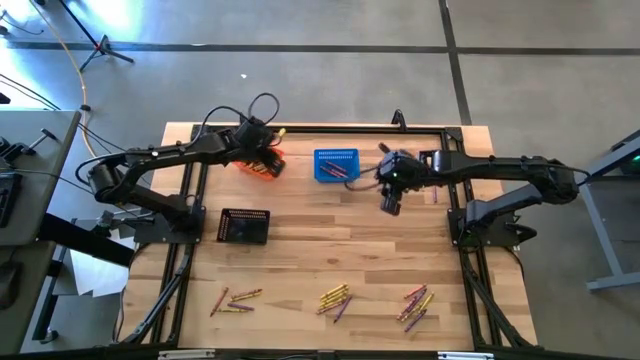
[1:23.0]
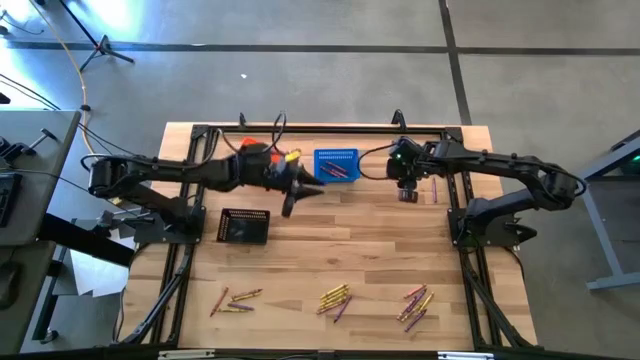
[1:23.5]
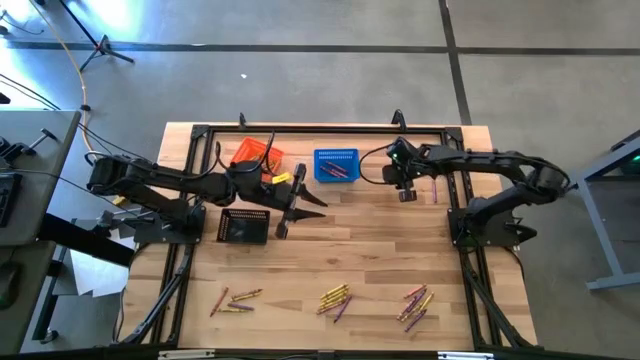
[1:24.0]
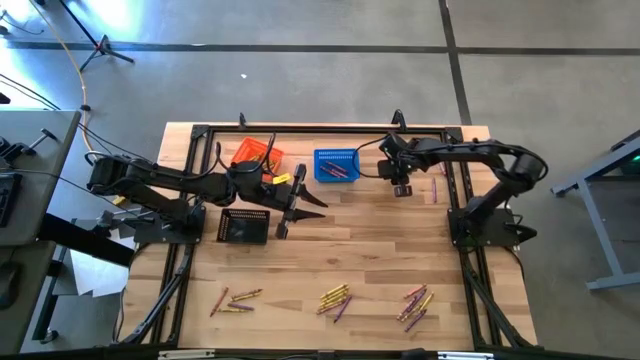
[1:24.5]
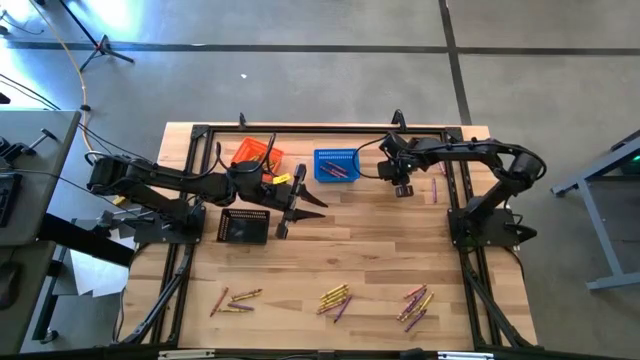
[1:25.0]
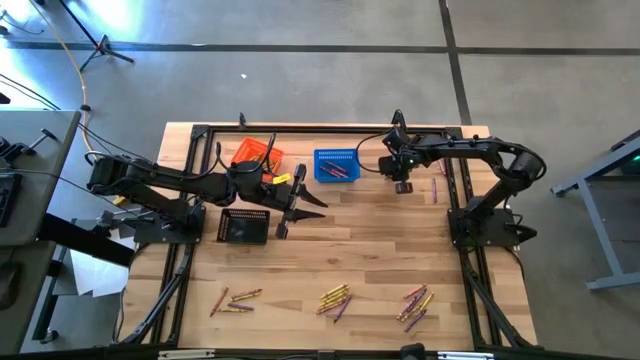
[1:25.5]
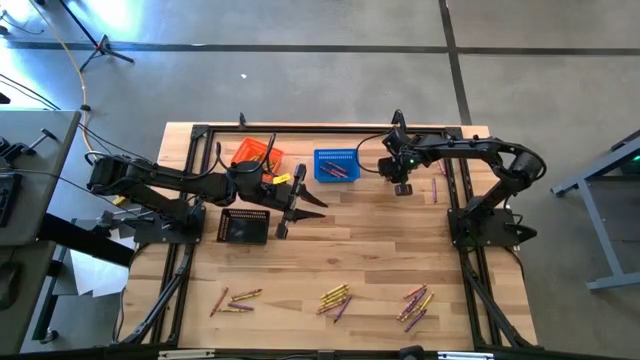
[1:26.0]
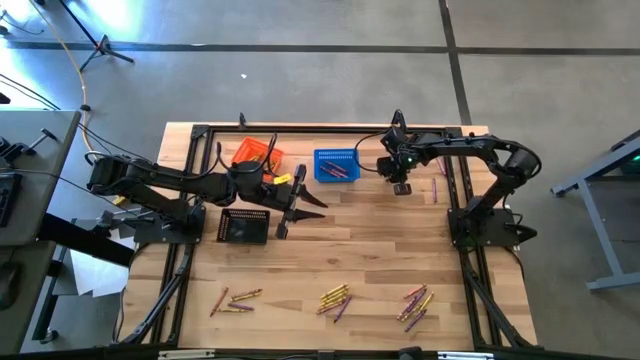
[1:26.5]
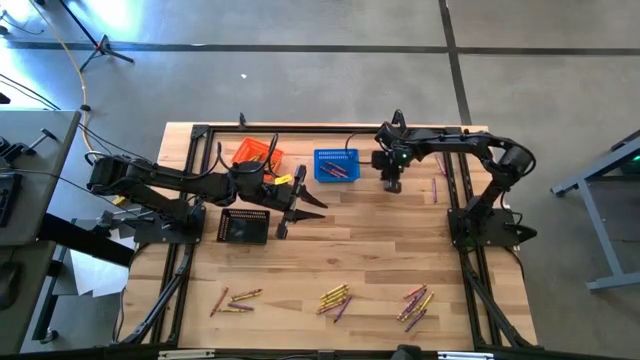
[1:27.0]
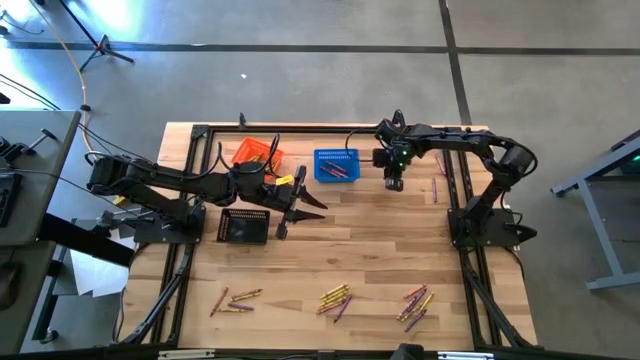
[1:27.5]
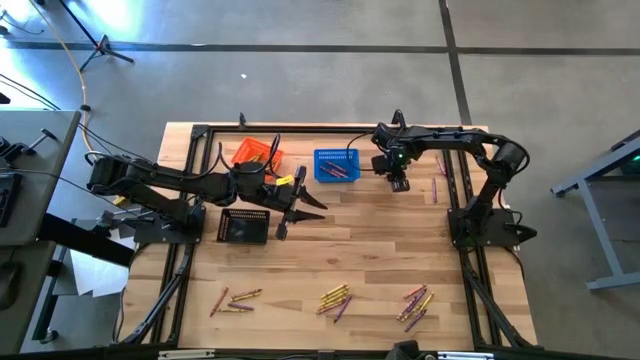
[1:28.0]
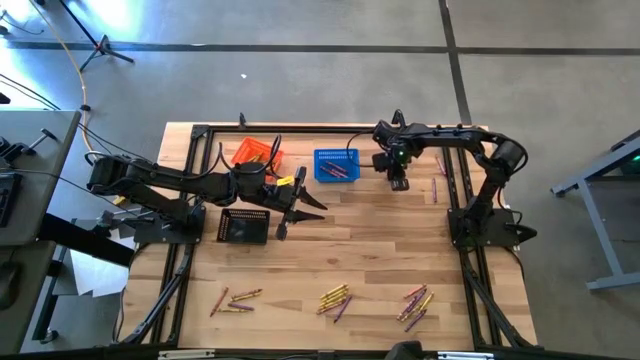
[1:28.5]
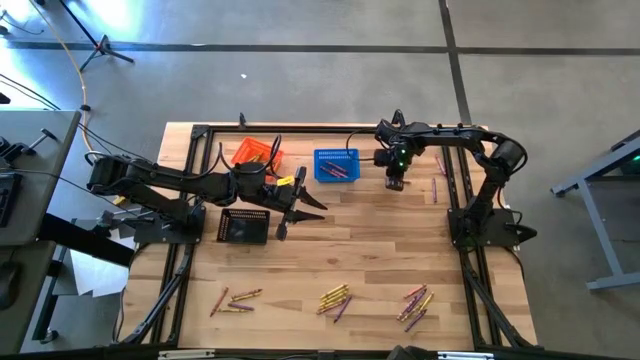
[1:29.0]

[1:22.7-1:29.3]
Task: Sort crayons
Put the yellow crayon into the orange bin

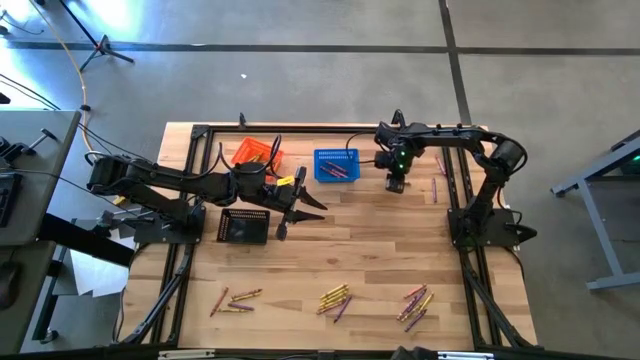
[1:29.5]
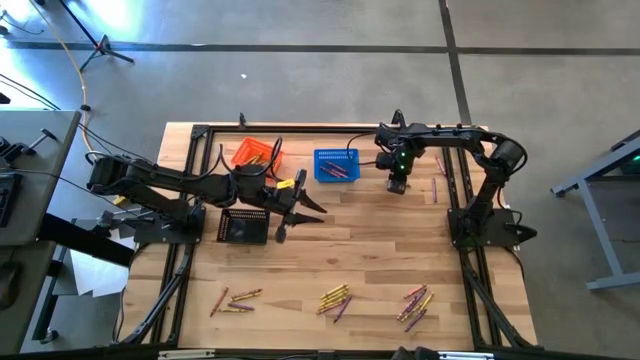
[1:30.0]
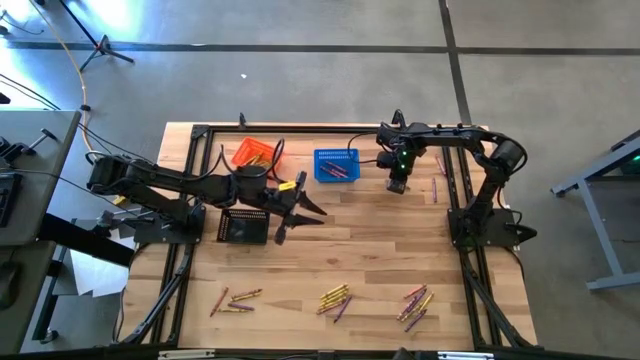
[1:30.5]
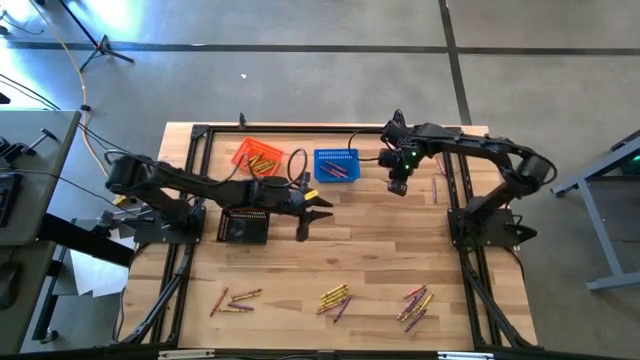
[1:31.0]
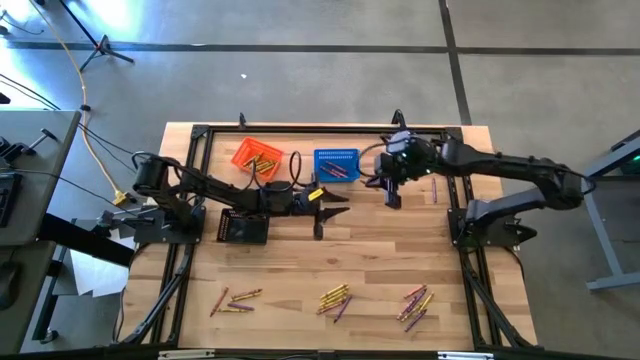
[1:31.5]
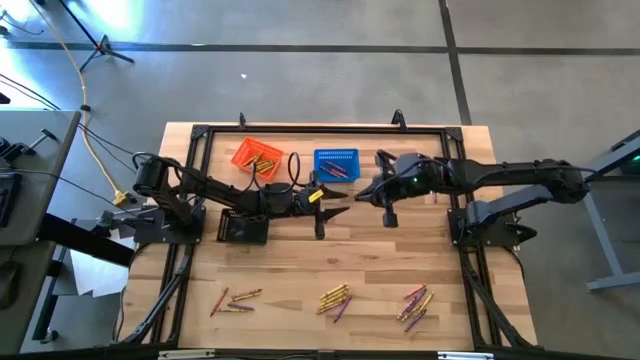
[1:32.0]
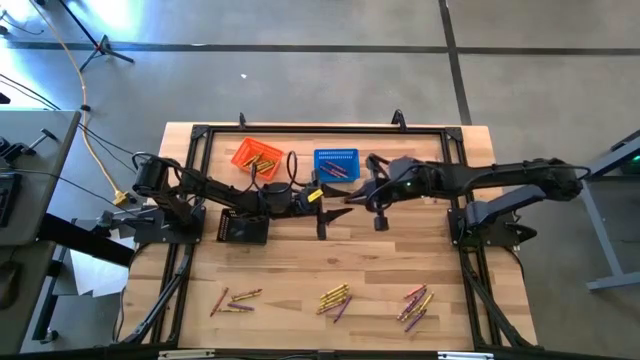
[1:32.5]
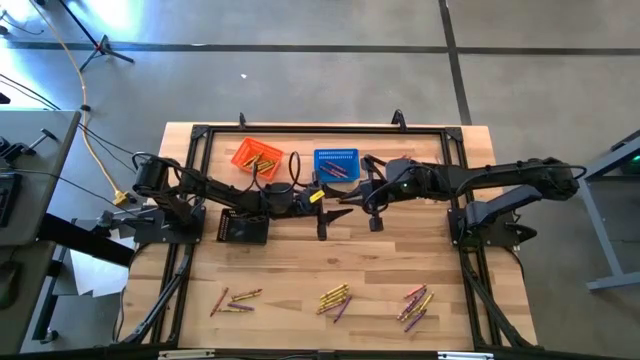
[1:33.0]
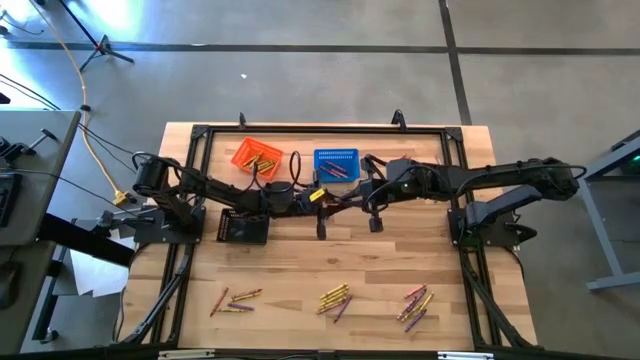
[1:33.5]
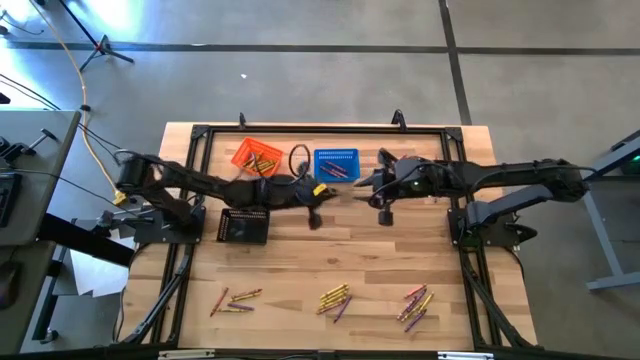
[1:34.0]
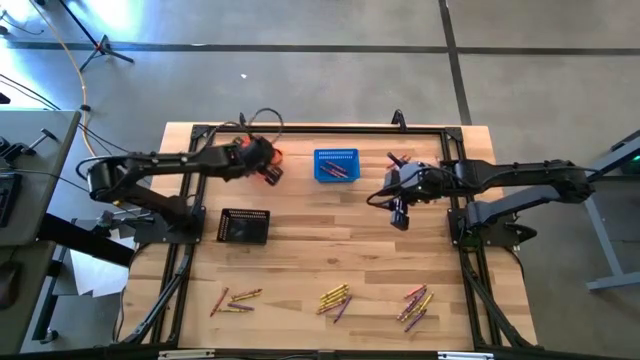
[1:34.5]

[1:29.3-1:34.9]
Put the yellow crayon into the orange bin

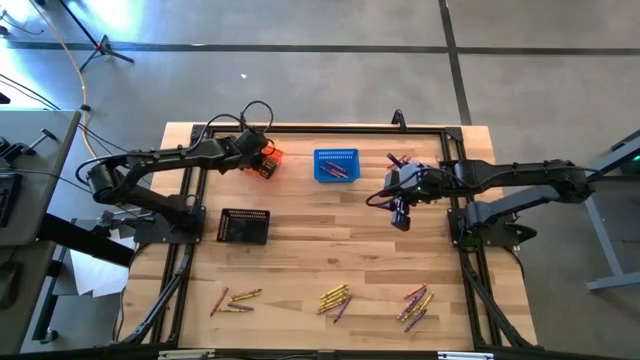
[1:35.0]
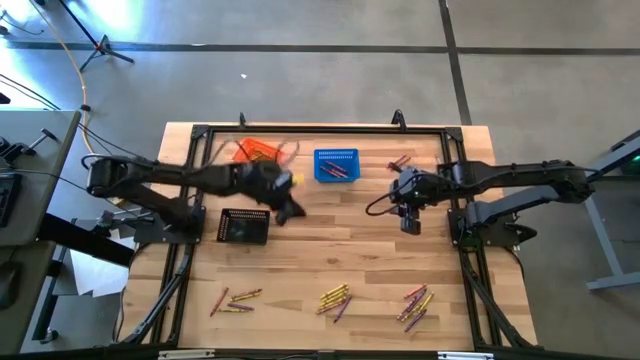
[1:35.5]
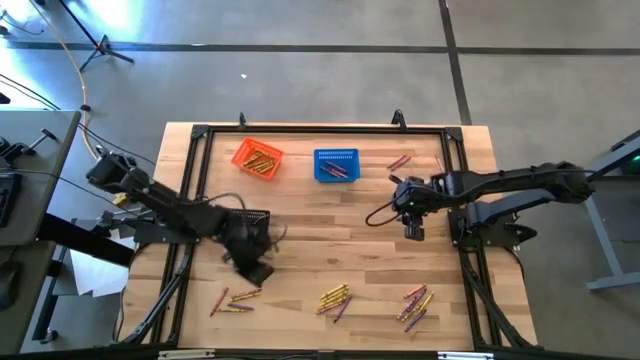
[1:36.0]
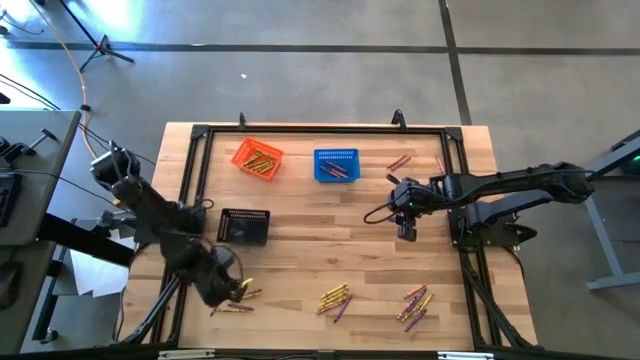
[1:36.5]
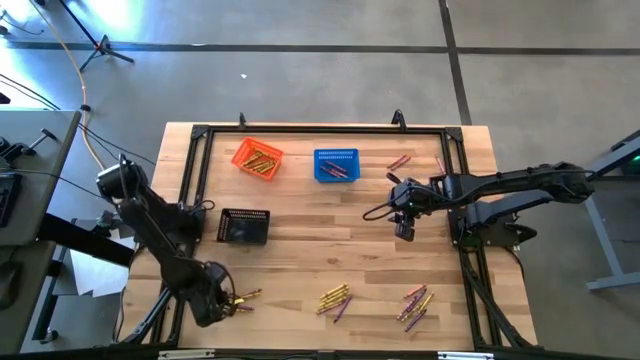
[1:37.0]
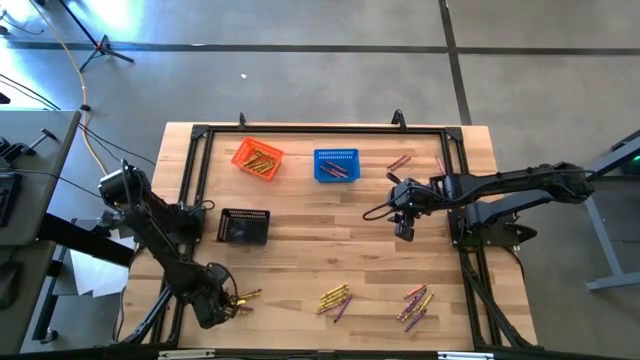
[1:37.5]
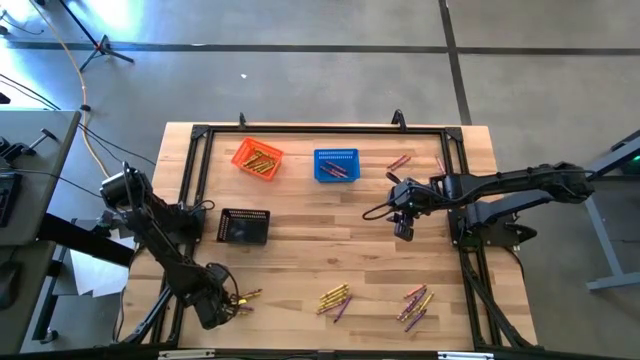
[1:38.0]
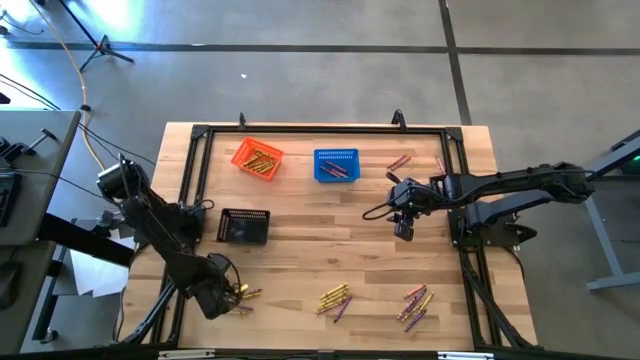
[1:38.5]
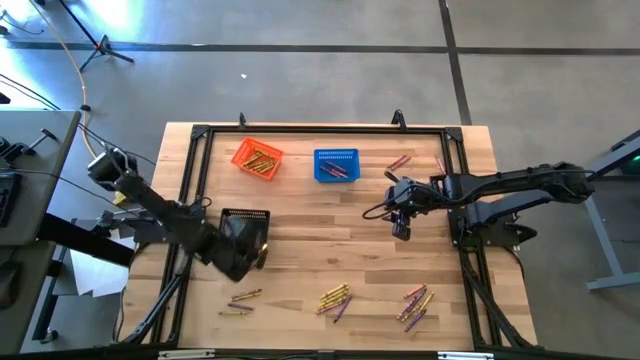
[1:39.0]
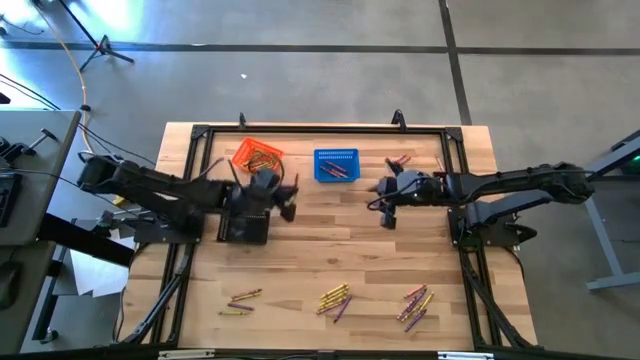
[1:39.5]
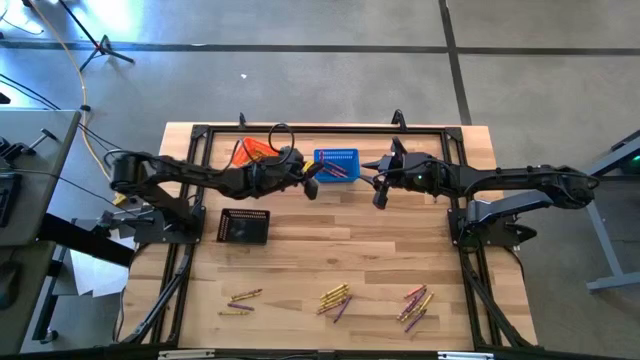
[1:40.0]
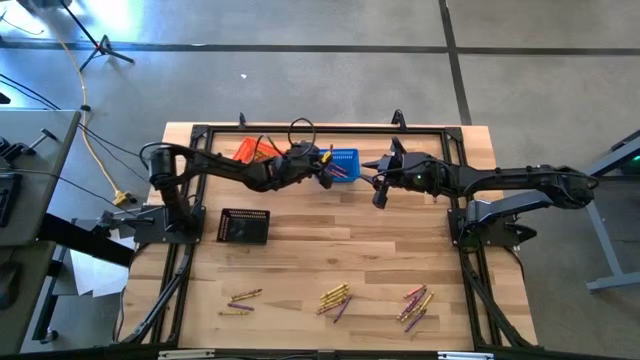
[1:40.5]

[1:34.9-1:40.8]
Put the red crayon into the blue bin

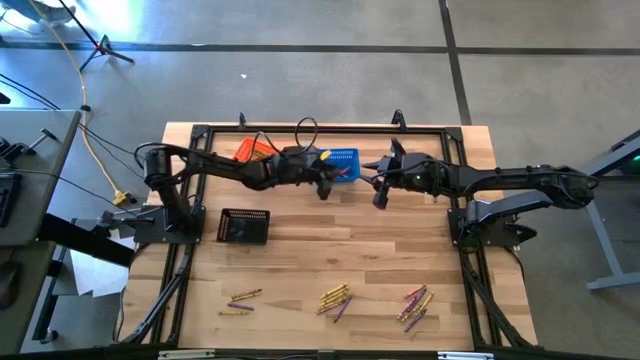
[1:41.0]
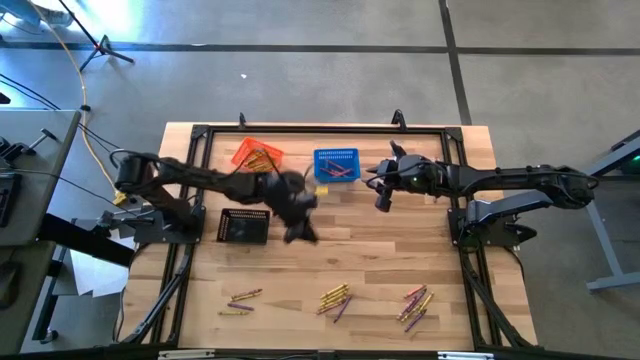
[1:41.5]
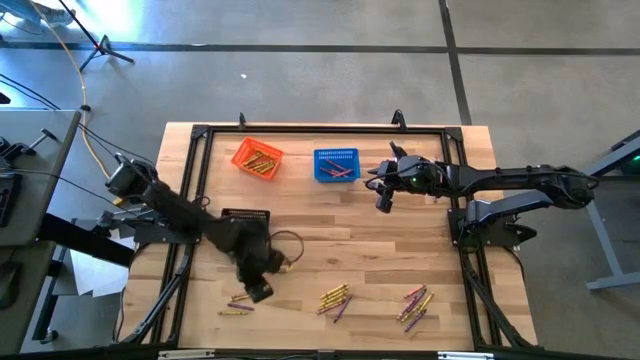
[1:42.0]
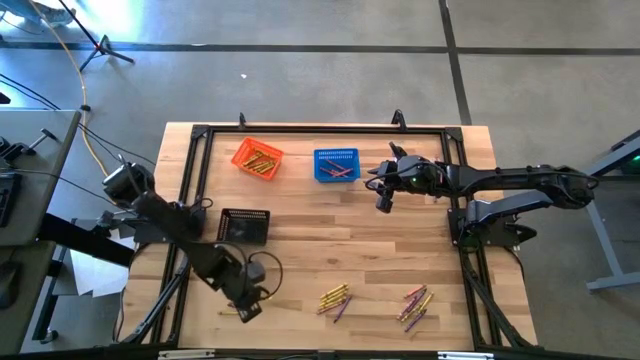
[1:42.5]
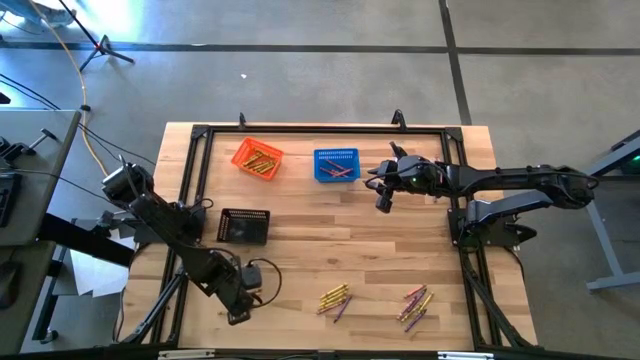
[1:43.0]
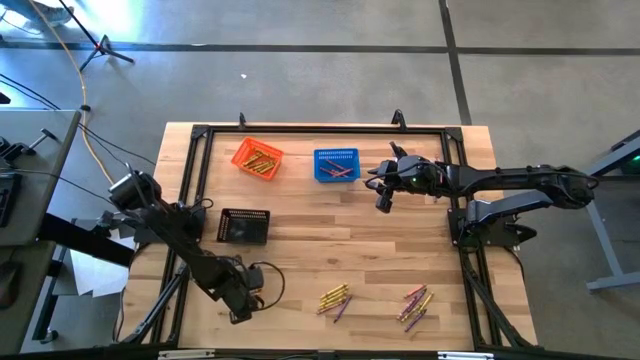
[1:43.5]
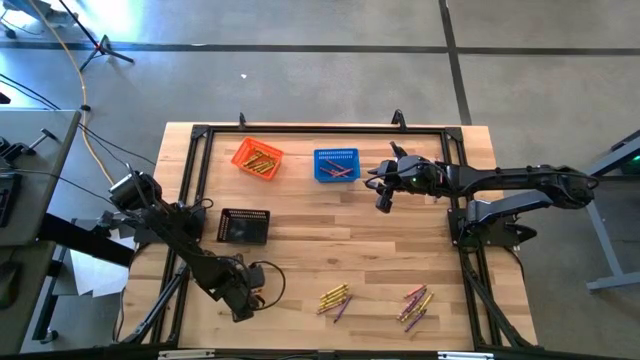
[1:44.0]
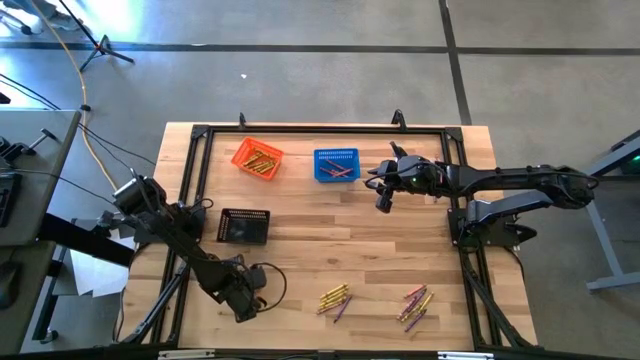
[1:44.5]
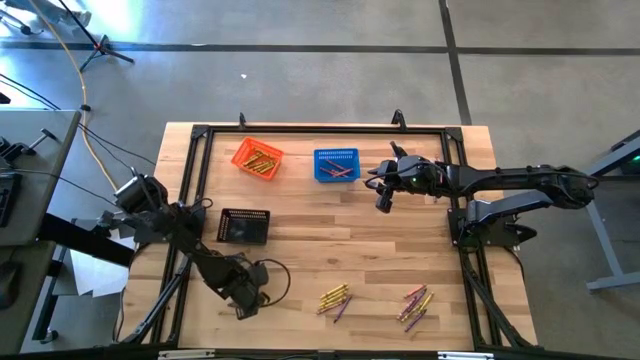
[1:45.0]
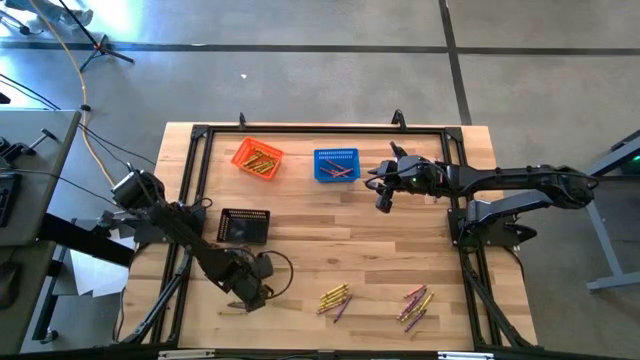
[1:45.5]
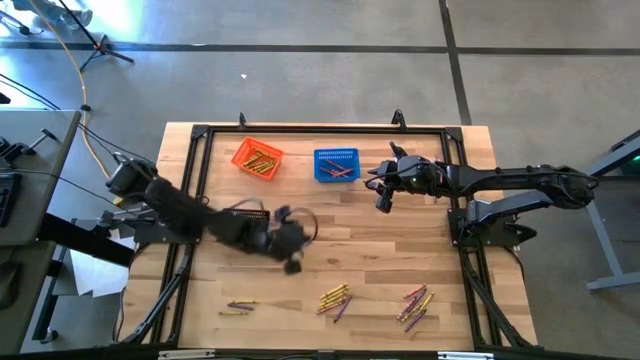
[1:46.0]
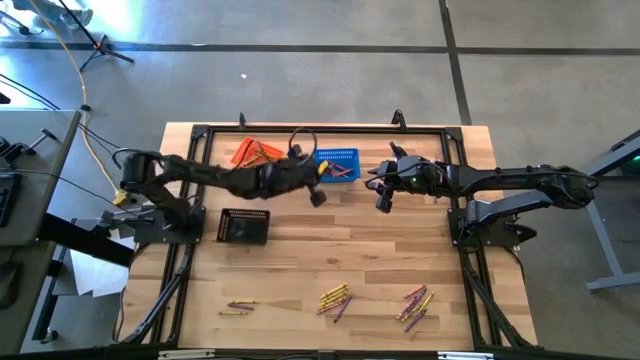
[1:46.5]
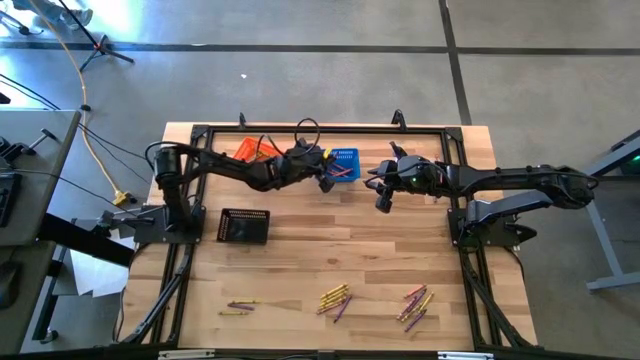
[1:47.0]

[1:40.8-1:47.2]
Put the red crayon into the blue bin
